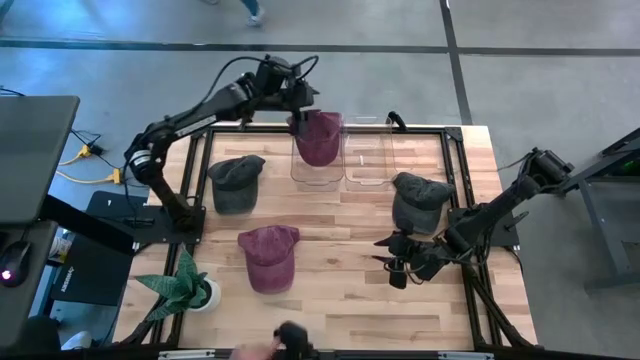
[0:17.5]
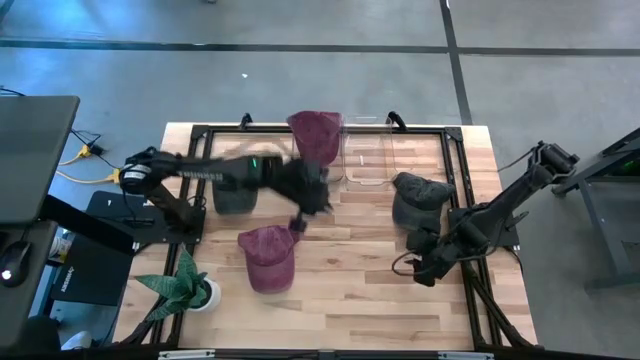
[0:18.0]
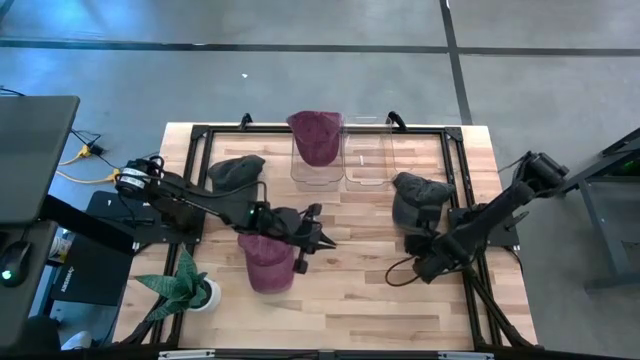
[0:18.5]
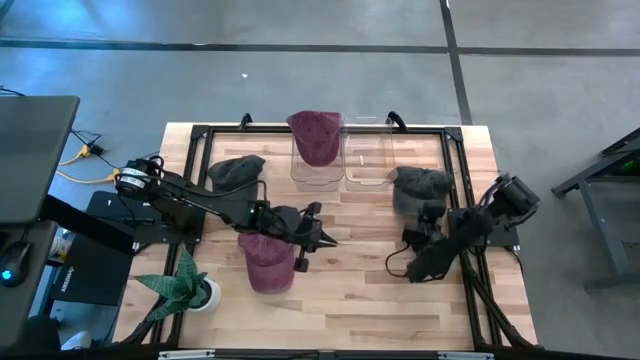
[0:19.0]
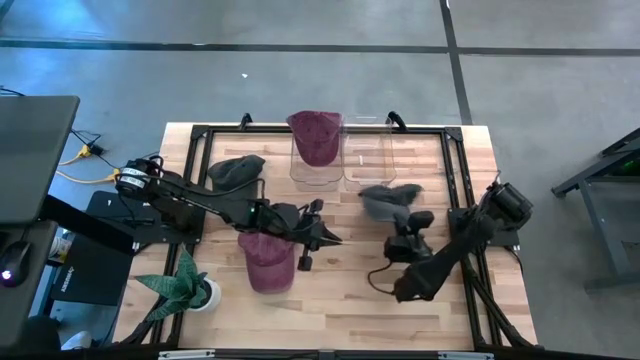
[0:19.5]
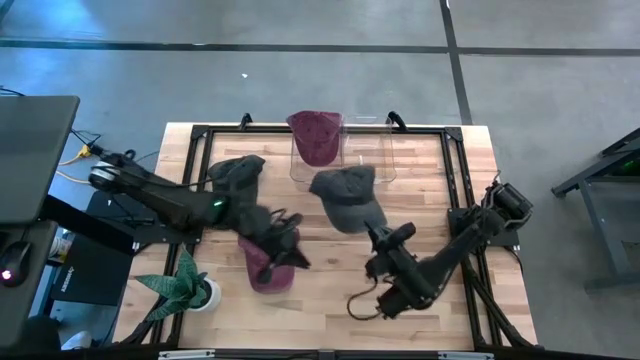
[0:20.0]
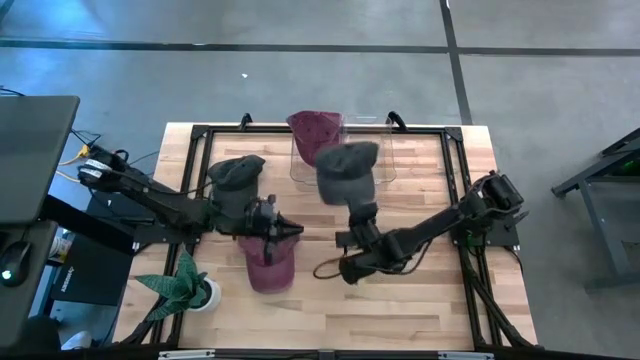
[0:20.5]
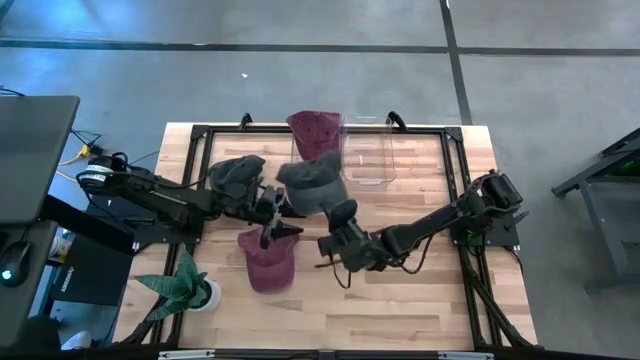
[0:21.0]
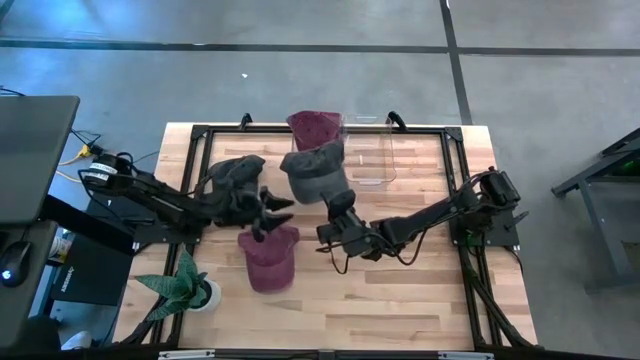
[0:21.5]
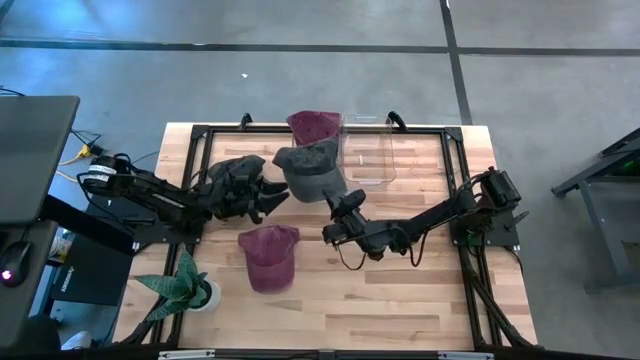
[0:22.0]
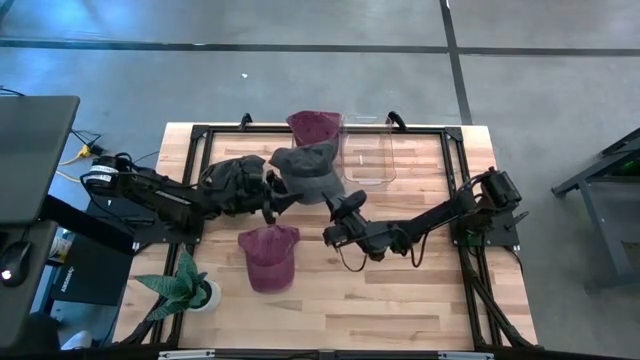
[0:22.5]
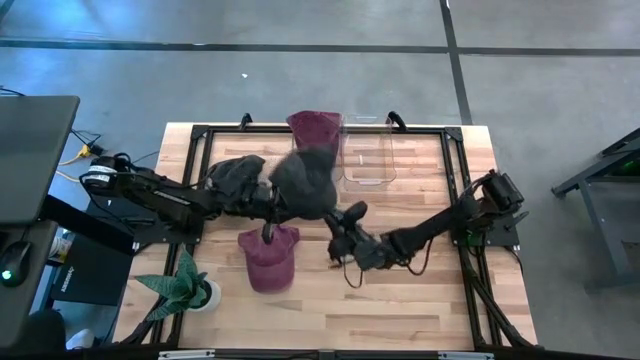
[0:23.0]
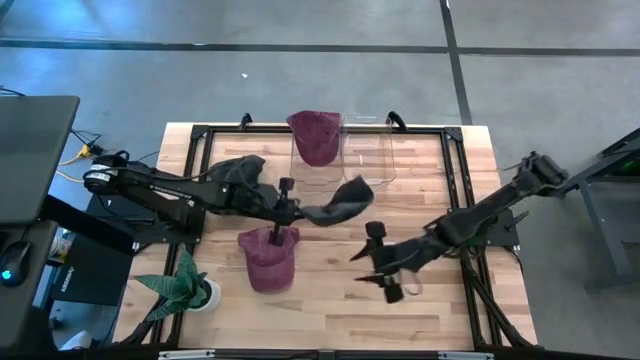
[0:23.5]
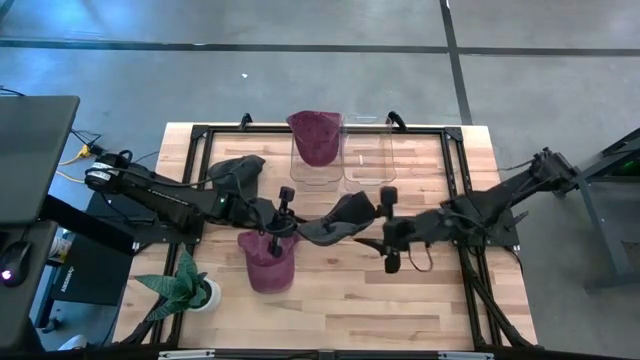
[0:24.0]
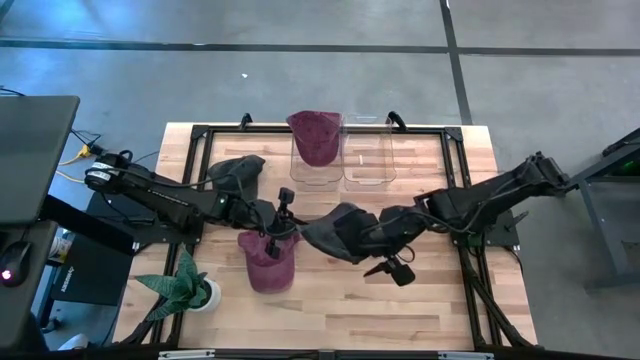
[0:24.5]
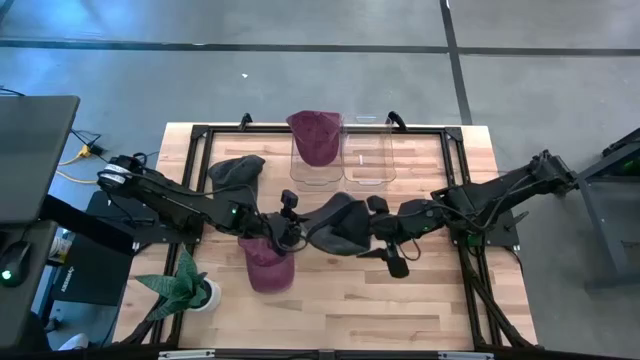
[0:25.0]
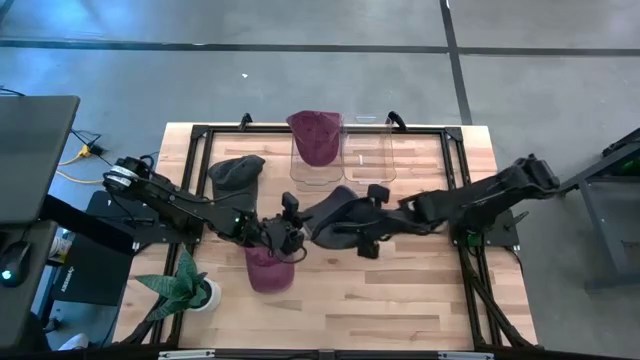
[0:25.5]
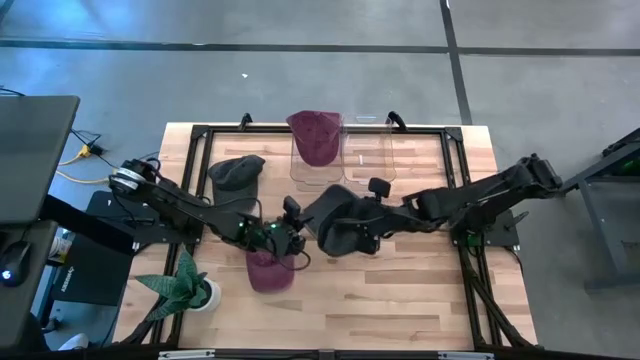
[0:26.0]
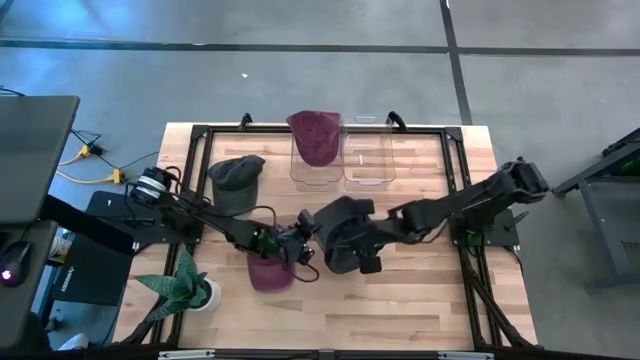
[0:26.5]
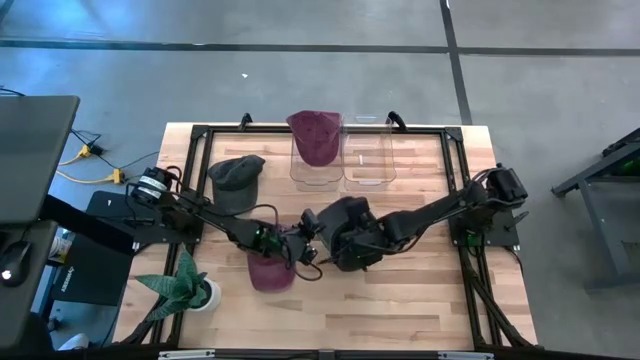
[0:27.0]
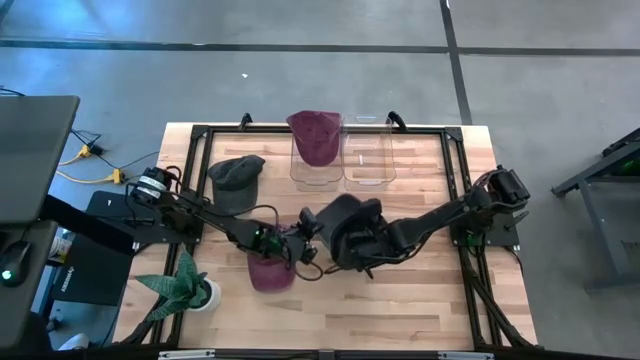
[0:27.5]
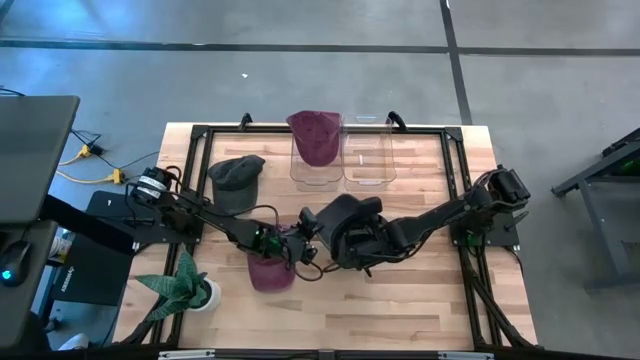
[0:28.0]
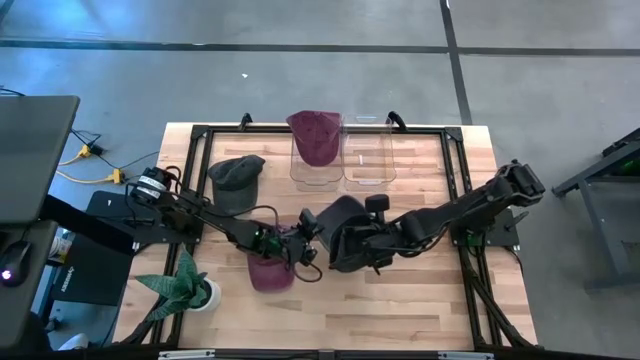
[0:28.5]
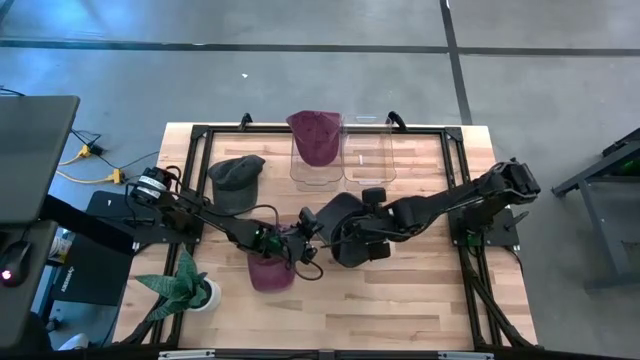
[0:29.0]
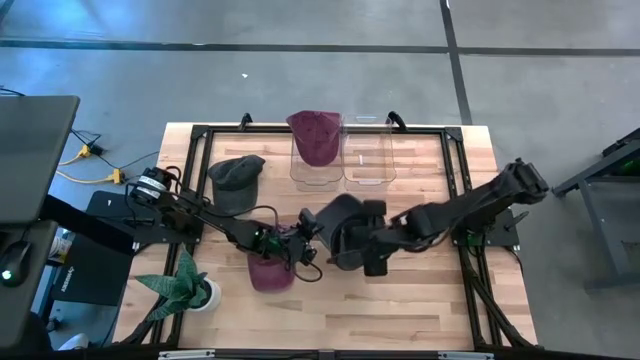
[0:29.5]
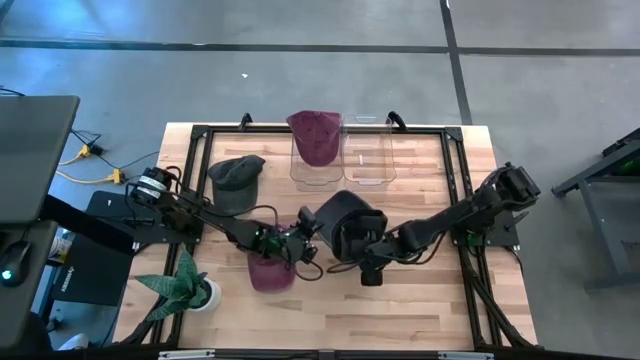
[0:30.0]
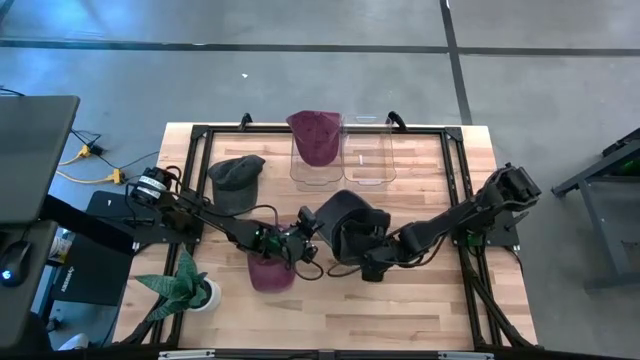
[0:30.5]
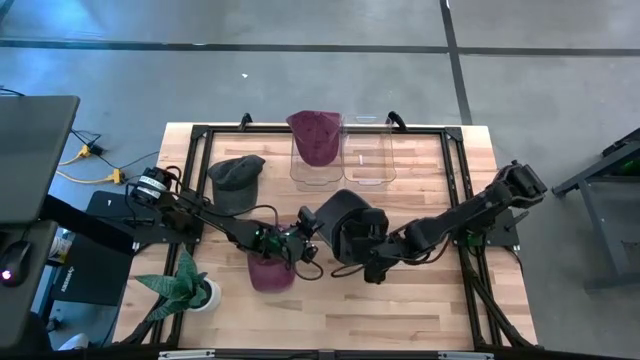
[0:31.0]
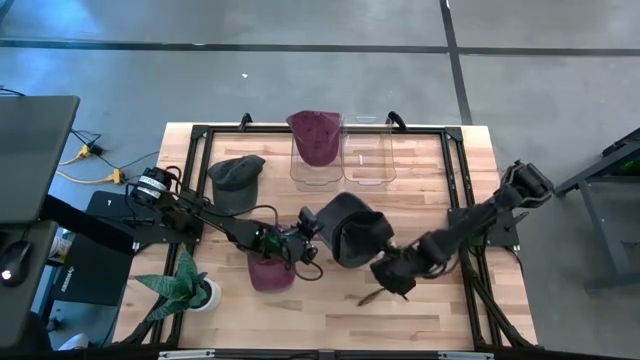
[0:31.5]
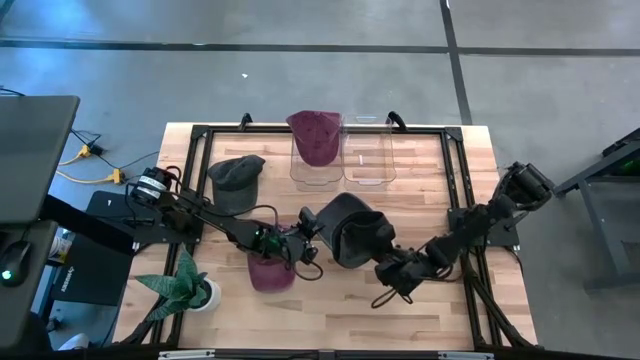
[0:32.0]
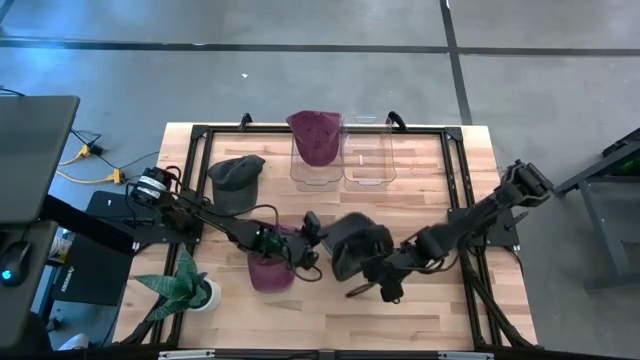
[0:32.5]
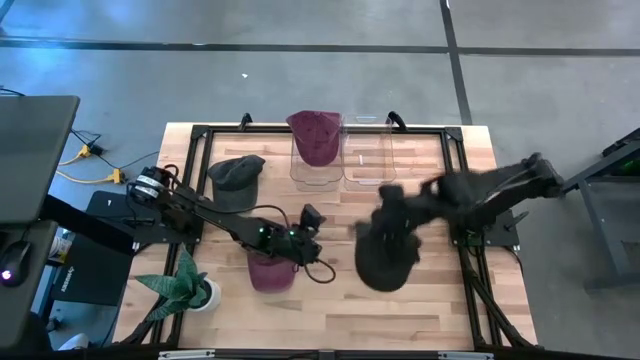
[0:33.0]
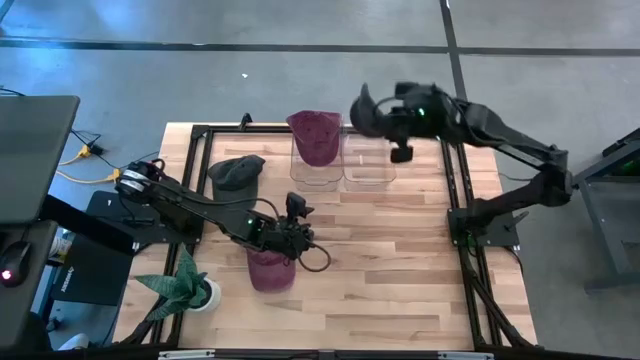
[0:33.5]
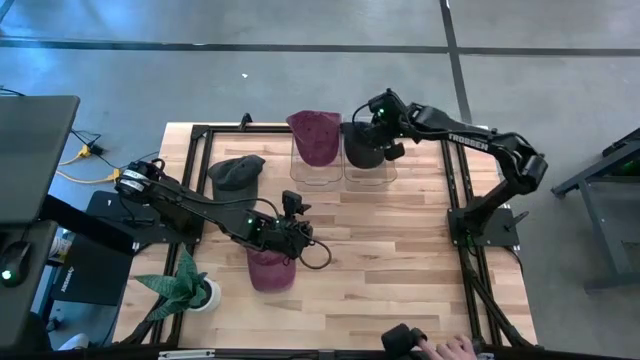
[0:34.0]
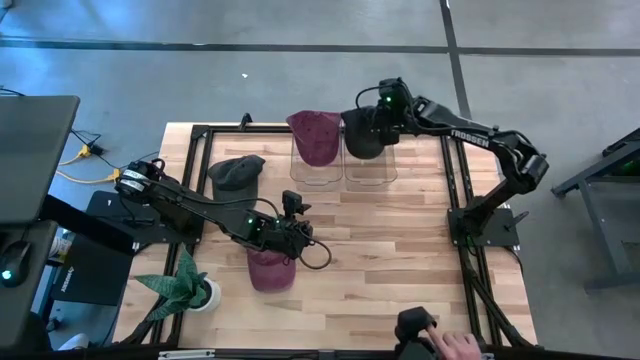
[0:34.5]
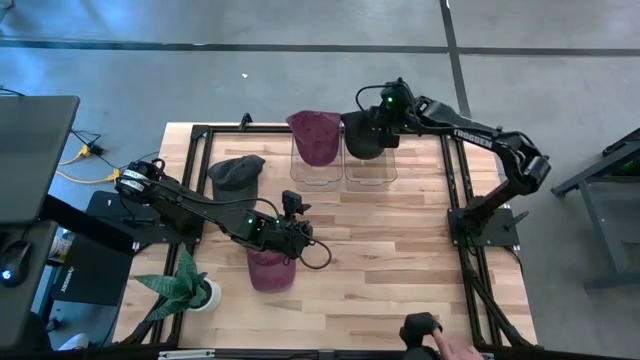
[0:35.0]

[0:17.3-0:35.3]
Task: Pick & Place hat
Put the right black cap into the right transparent bin

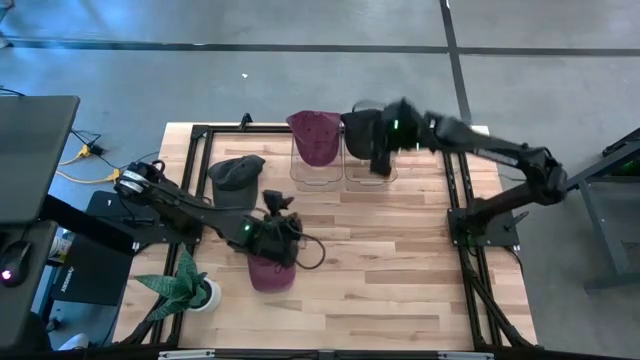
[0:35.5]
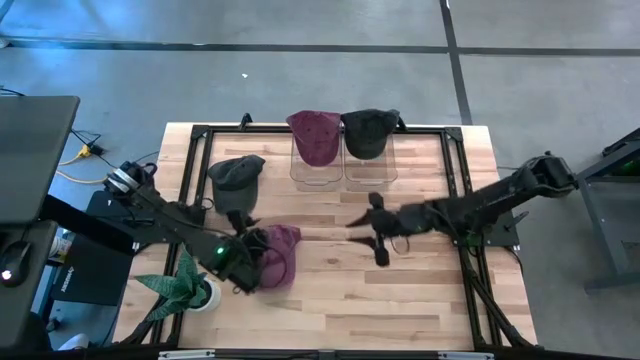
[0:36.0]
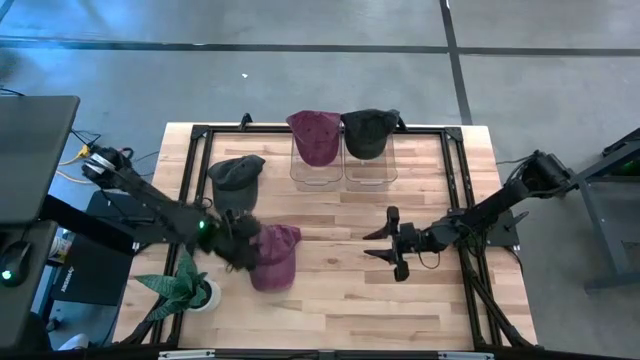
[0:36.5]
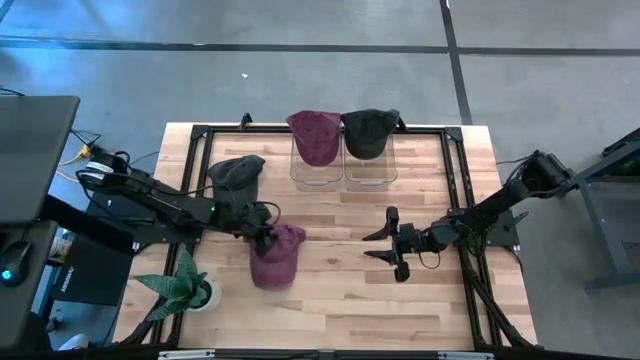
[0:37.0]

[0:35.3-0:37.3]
Put the red cap into the left transparent bin

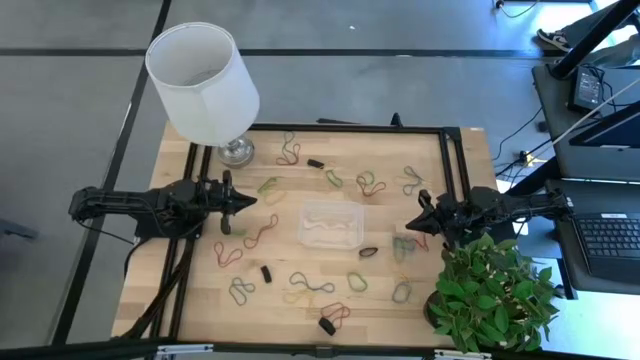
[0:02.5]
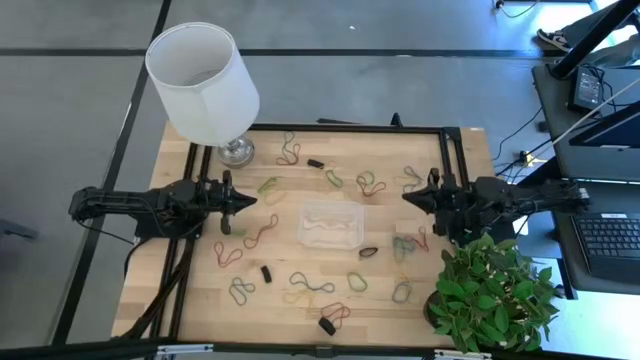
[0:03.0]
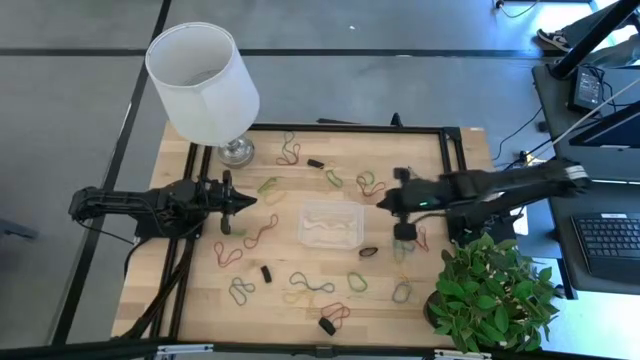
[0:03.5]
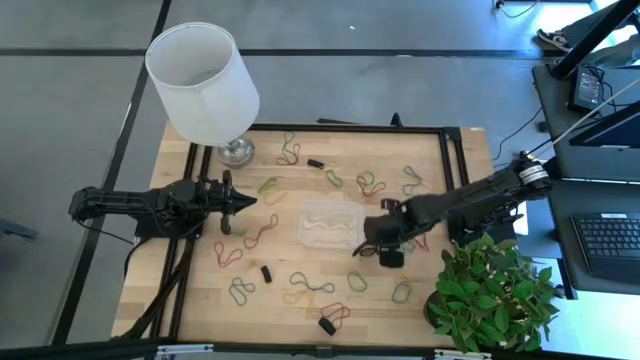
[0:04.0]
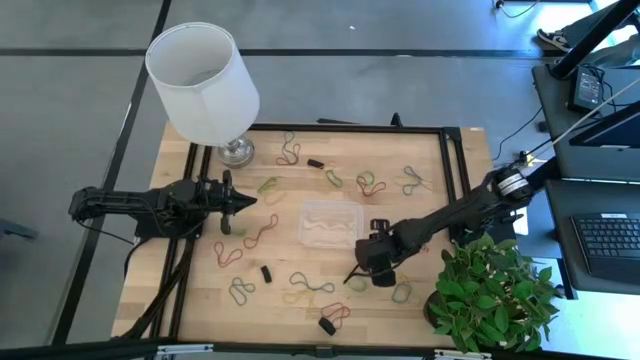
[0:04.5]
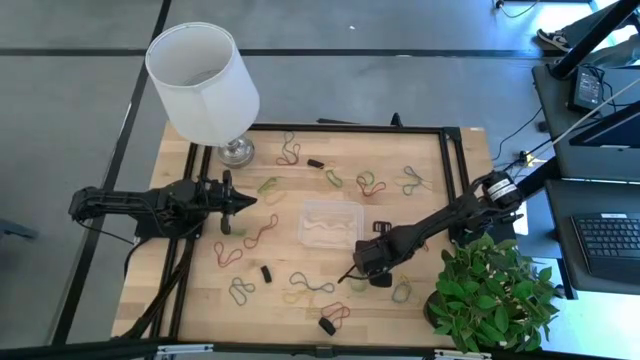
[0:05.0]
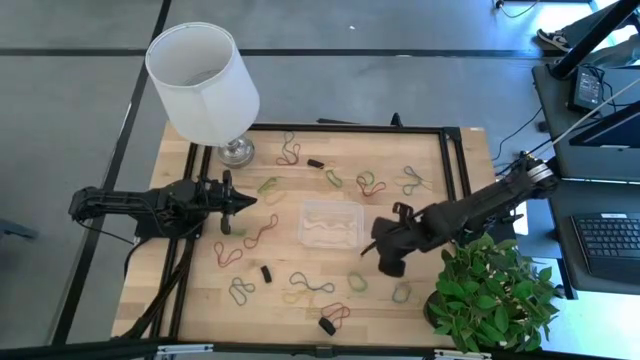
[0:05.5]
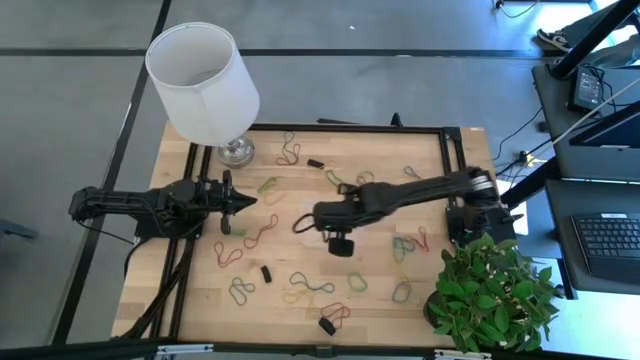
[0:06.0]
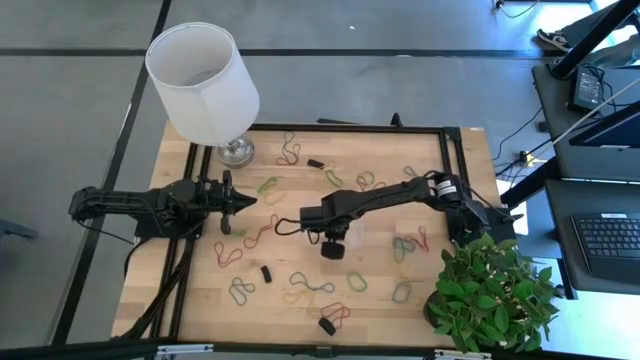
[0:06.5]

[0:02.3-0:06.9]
Task: Pick and place rubber bands into bin
Put the black rubber band into the transparent bin
